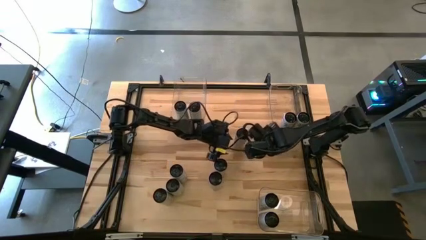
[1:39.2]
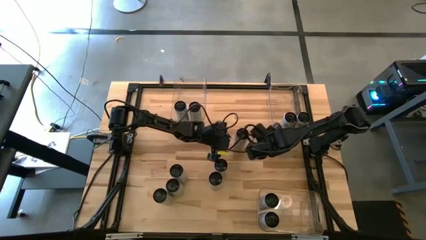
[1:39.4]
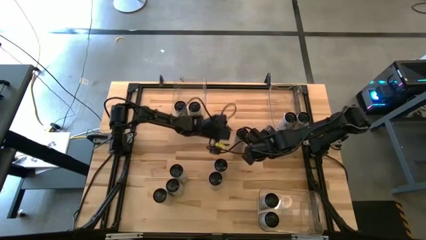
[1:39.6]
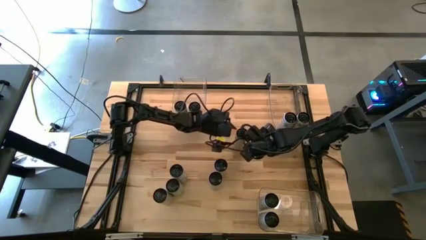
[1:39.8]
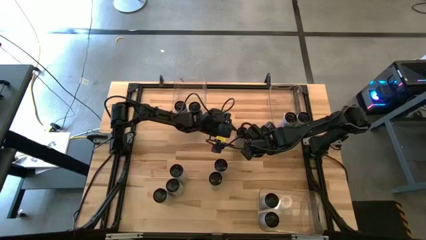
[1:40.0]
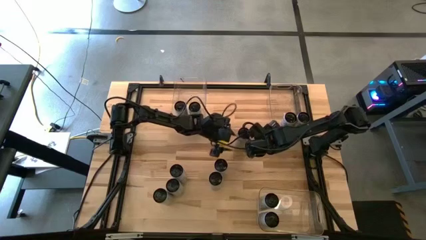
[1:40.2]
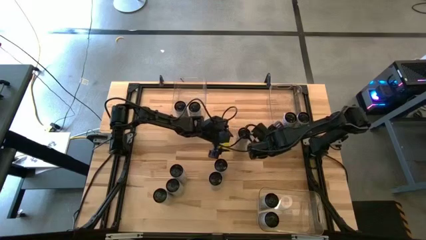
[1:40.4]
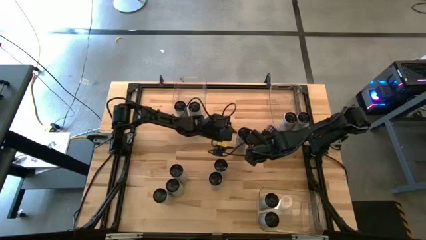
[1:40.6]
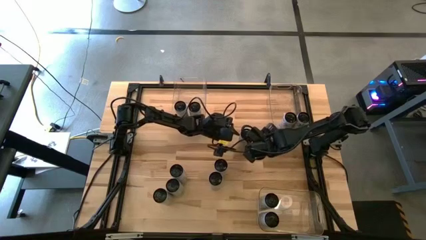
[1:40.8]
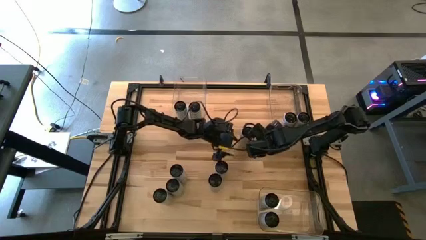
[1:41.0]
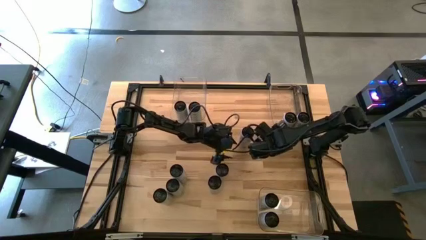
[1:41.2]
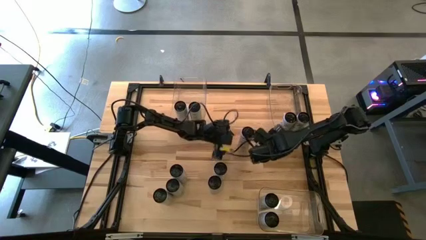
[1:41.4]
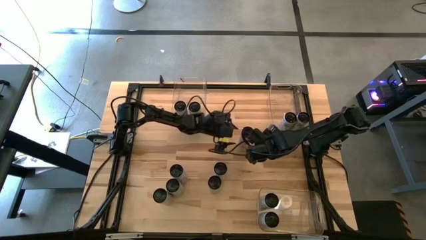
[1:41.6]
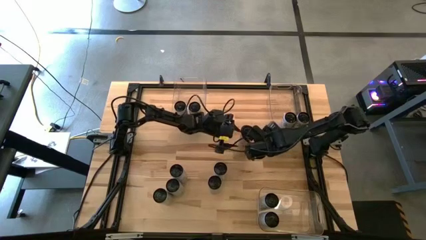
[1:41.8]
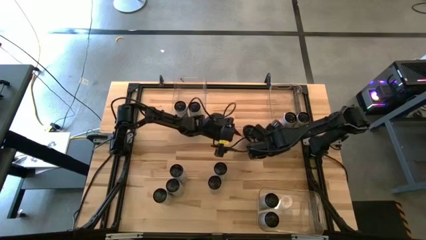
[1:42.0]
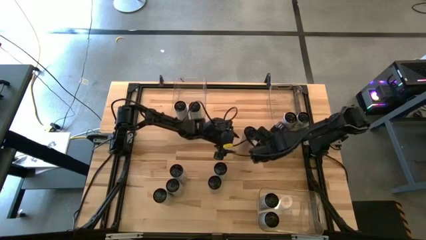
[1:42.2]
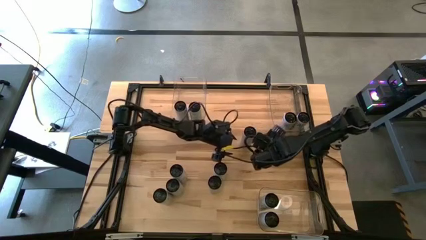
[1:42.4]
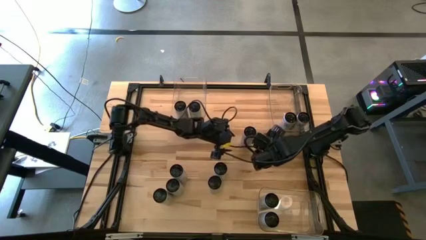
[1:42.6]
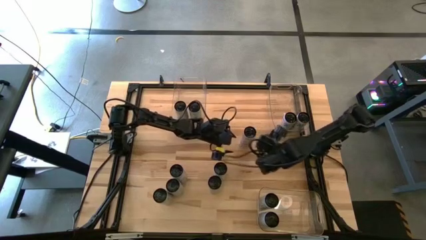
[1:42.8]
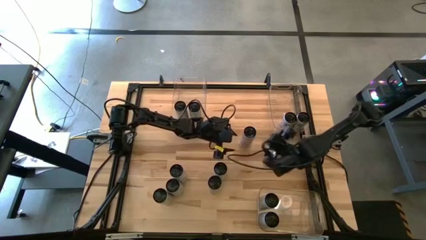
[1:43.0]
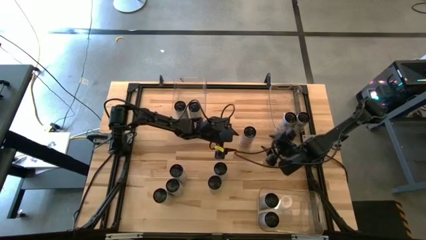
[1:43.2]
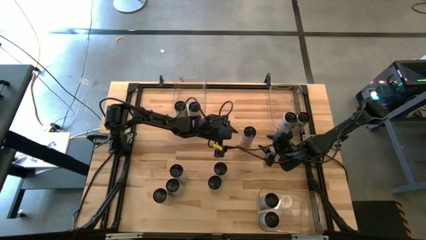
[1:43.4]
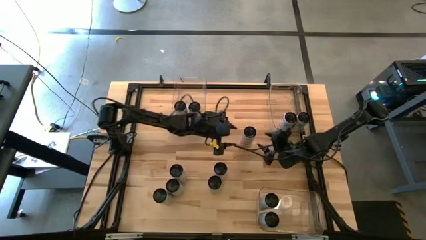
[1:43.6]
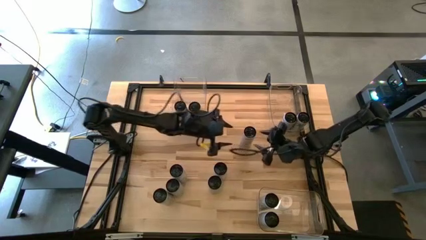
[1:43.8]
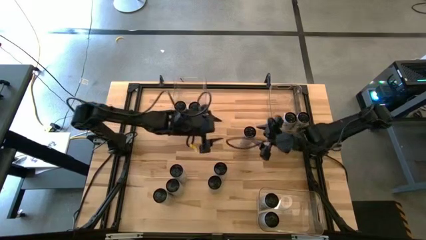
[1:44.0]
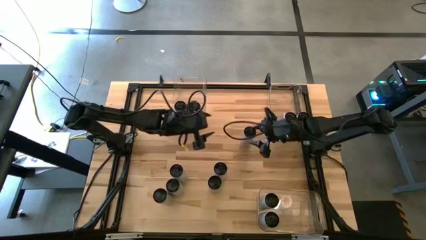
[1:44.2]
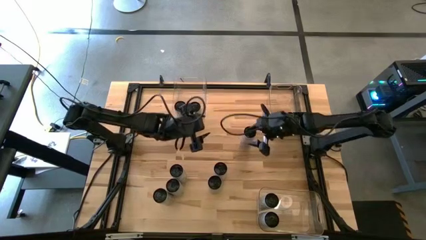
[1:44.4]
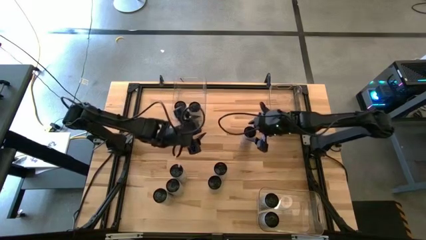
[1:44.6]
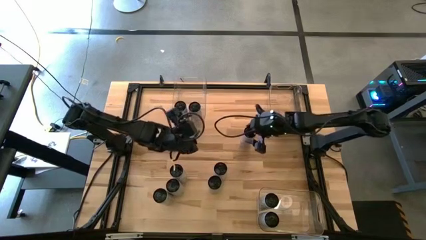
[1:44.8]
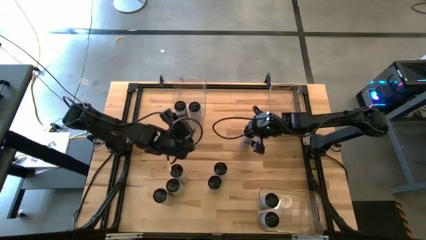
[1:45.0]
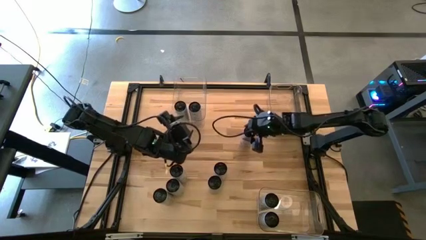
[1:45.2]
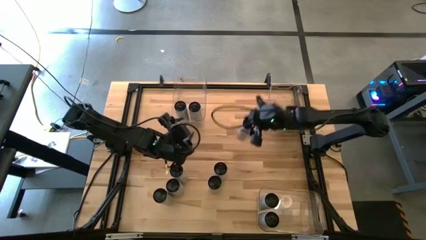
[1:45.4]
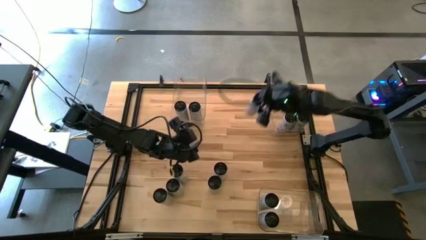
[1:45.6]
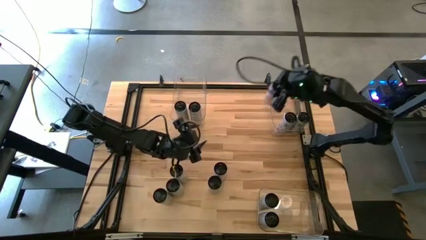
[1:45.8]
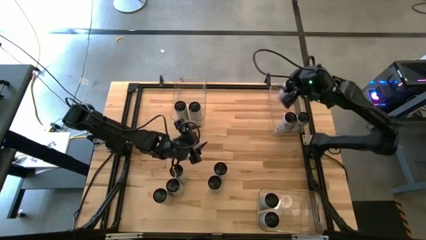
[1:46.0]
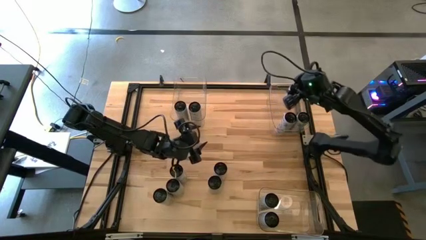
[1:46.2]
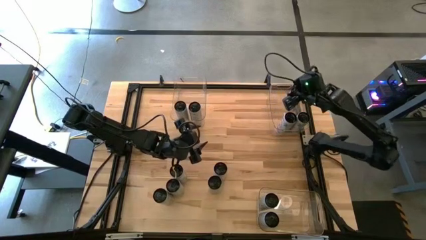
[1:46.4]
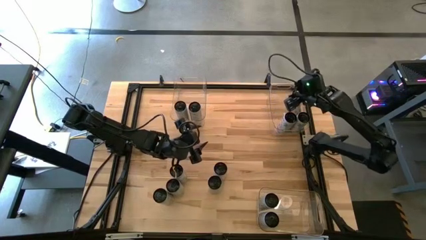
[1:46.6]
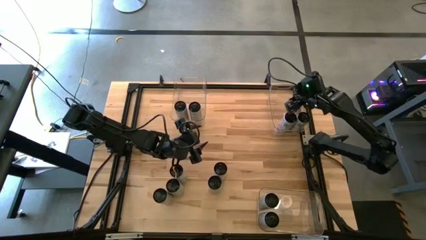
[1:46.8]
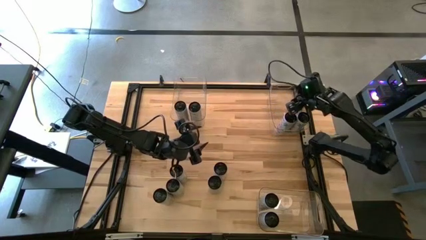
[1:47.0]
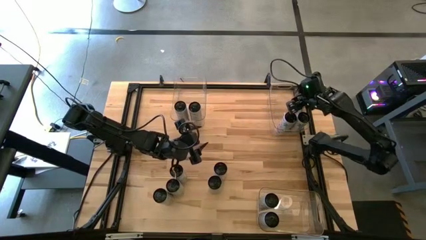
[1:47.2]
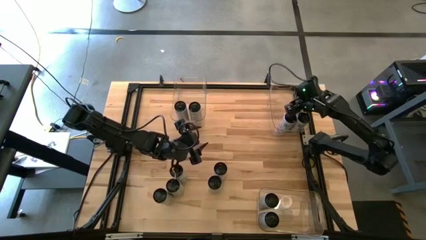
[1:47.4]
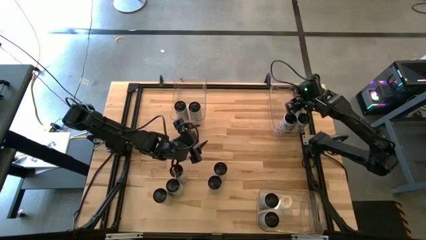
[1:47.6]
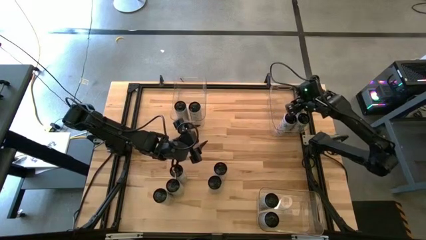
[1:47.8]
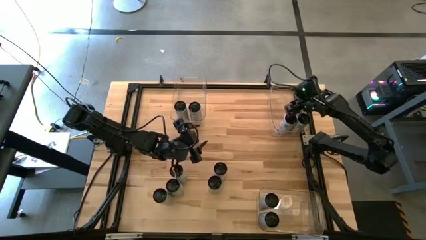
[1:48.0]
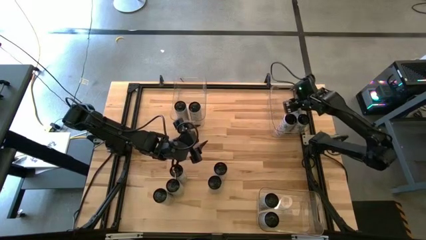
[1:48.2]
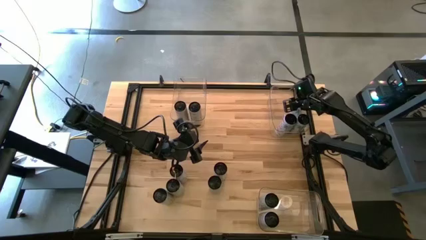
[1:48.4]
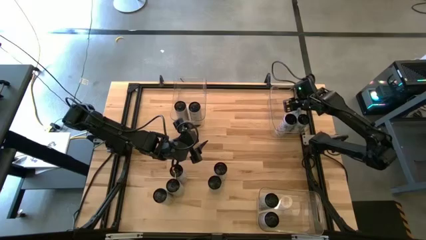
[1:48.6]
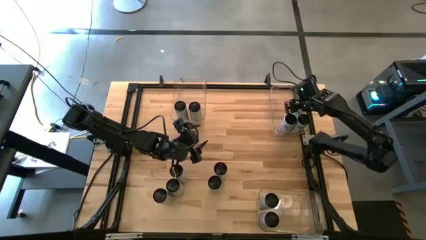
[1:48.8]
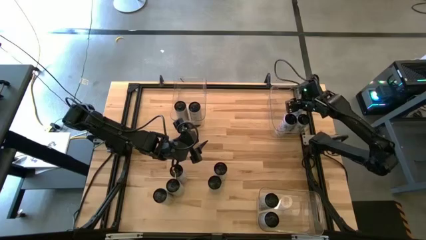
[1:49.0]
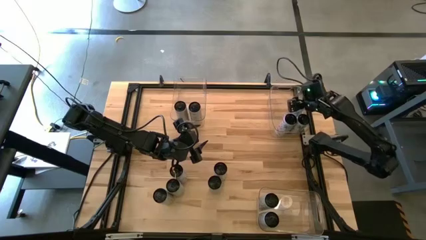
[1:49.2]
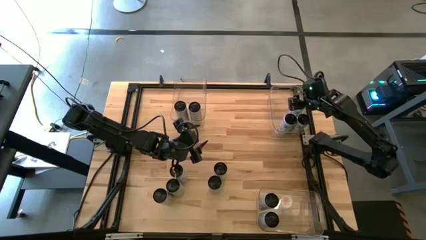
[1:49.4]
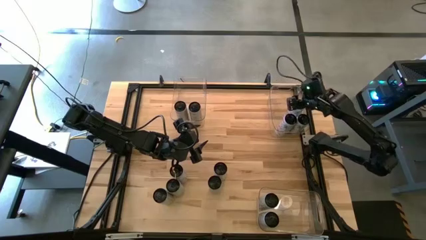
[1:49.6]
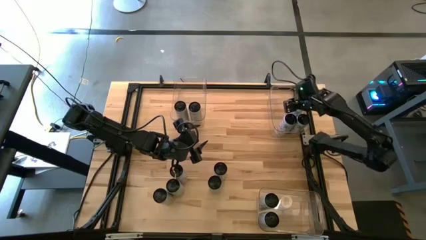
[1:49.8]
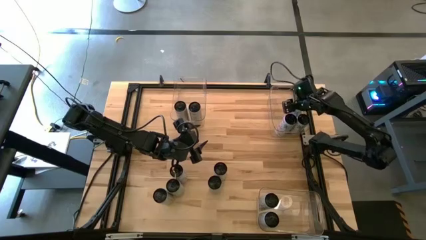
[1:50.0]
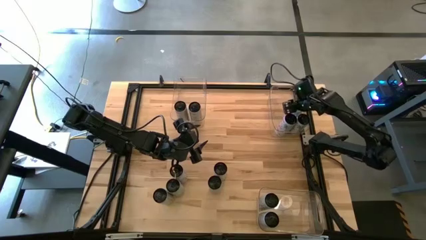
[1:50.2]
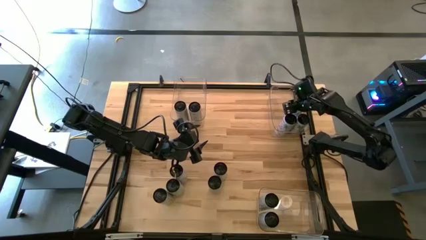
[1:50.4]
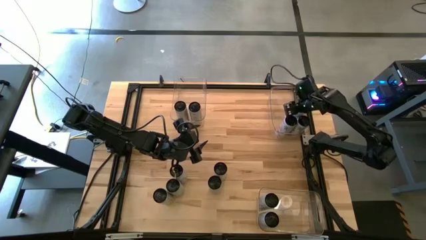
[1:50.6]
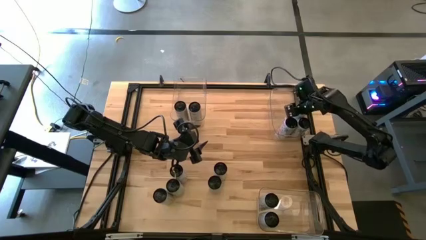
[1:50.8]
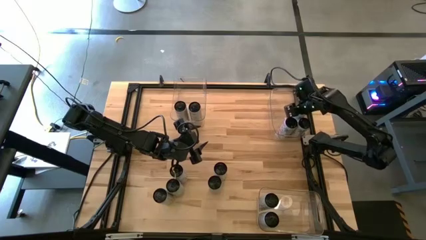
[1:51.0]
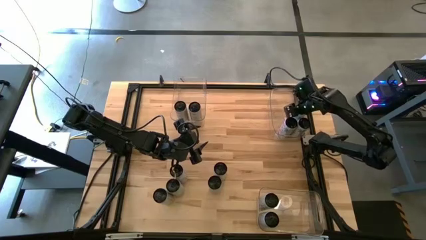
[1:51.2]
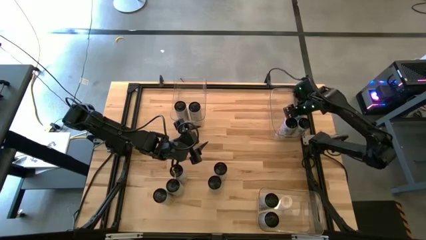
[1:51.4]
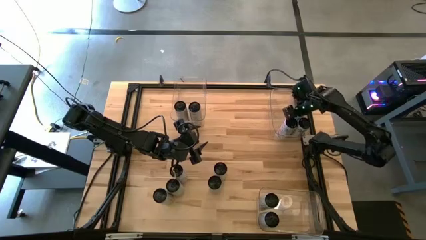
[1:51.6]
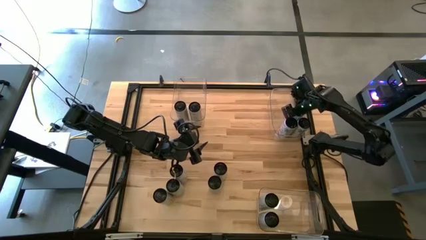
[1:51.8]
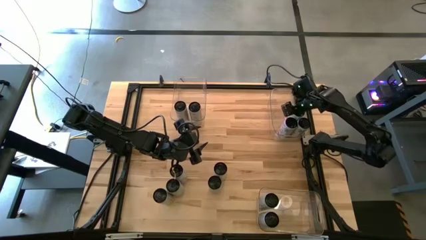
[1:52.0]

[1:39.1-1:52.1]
Task: Sort soda cans
Put the white/pink soda can into the top right transparent bin
